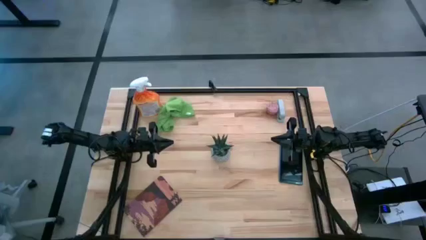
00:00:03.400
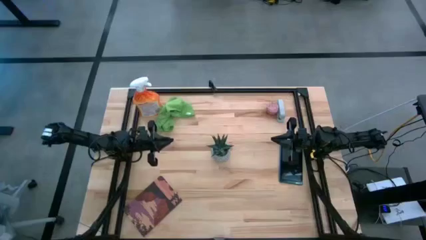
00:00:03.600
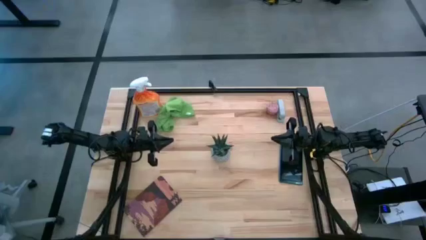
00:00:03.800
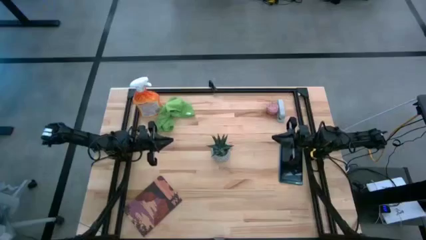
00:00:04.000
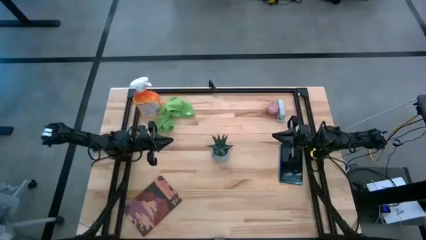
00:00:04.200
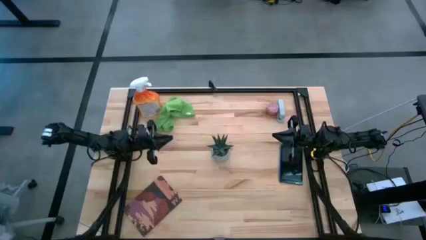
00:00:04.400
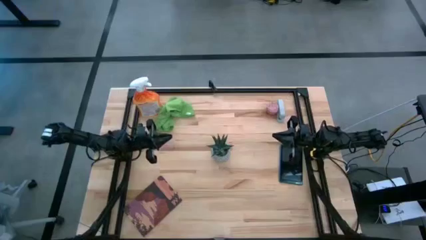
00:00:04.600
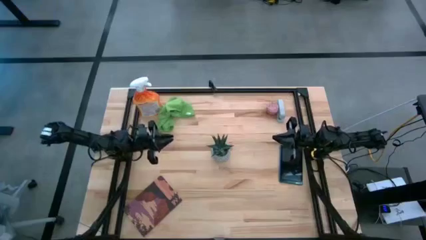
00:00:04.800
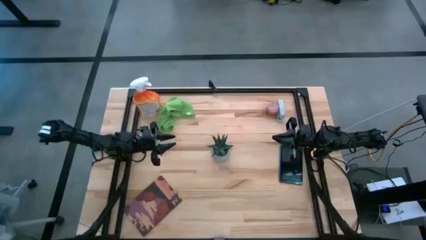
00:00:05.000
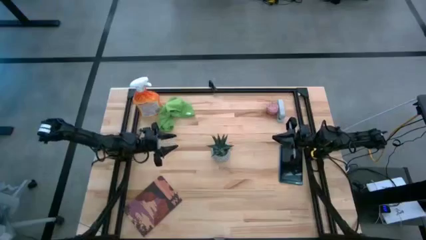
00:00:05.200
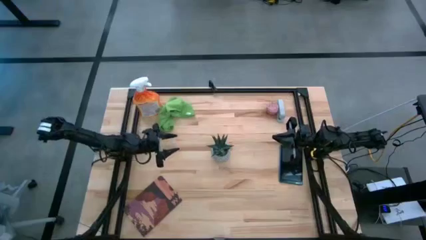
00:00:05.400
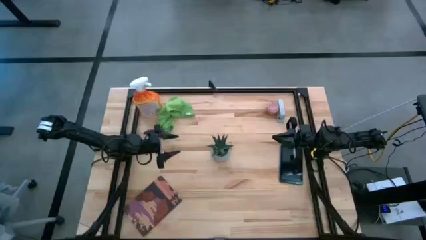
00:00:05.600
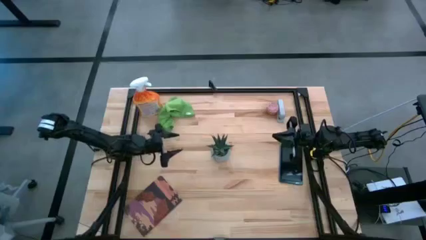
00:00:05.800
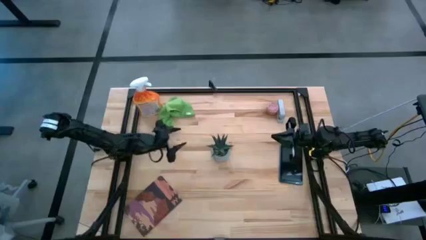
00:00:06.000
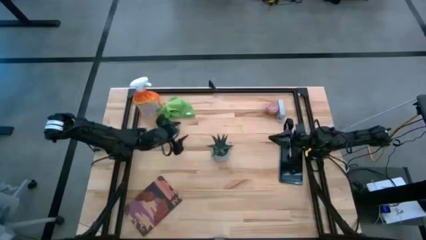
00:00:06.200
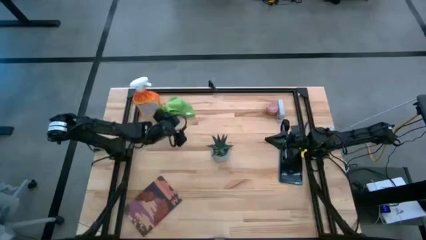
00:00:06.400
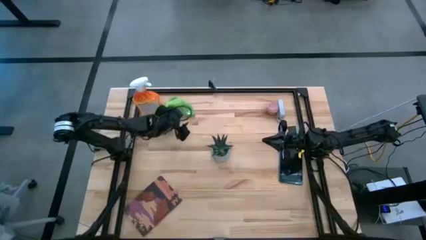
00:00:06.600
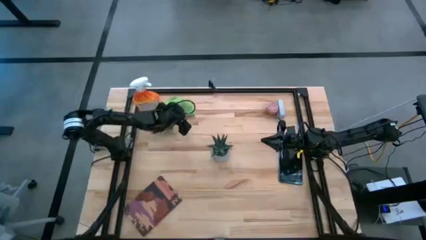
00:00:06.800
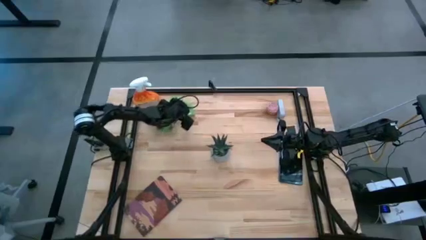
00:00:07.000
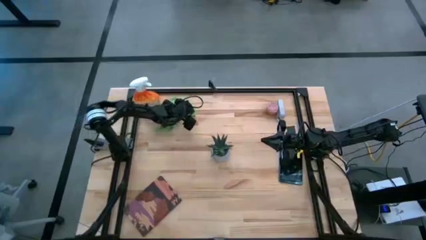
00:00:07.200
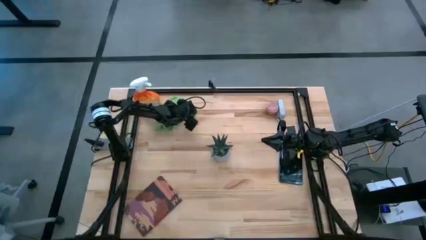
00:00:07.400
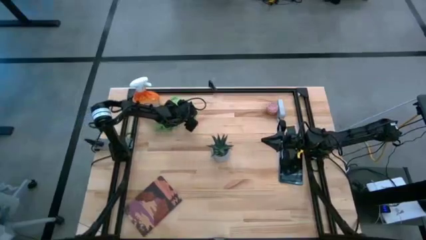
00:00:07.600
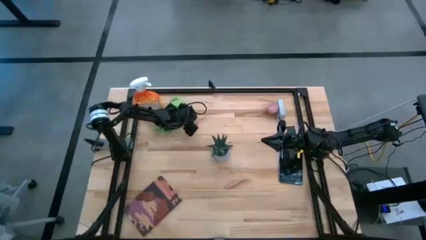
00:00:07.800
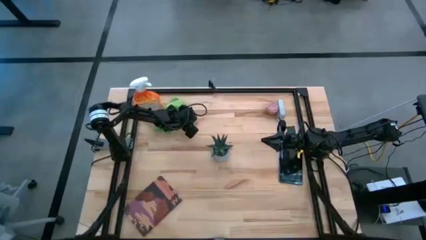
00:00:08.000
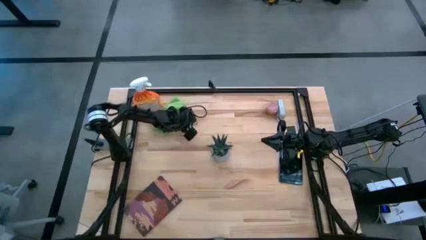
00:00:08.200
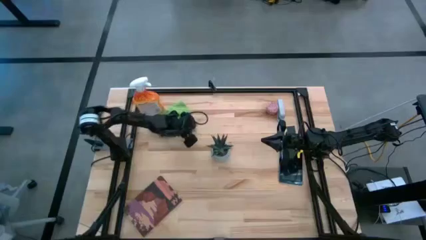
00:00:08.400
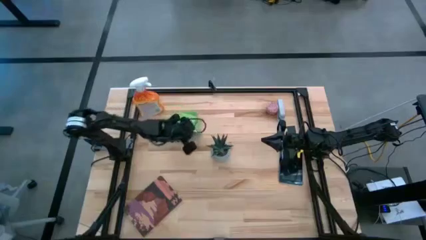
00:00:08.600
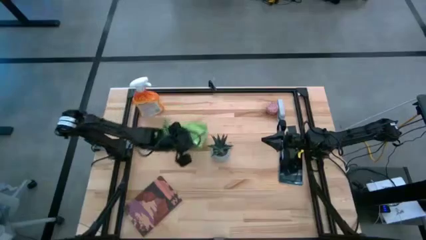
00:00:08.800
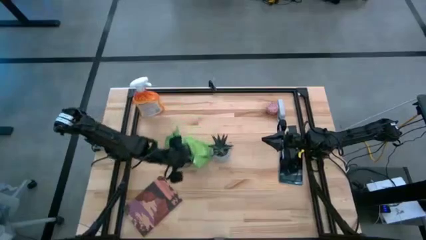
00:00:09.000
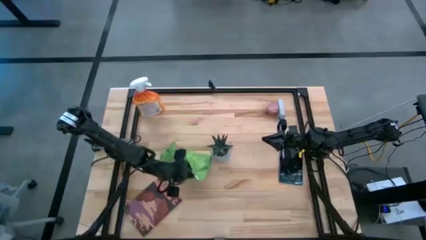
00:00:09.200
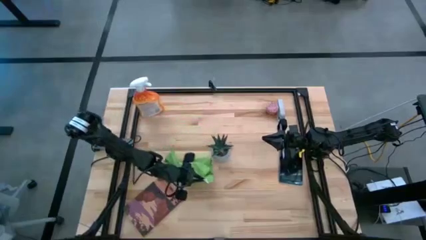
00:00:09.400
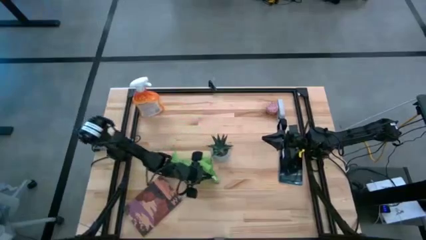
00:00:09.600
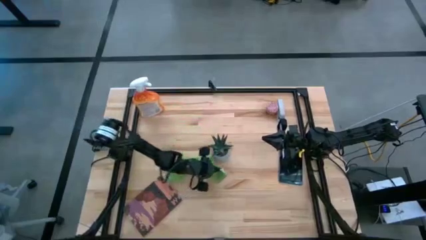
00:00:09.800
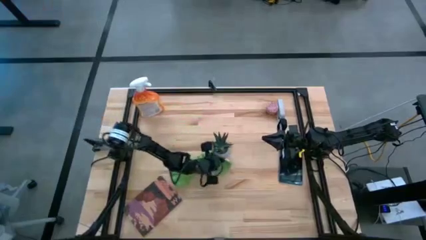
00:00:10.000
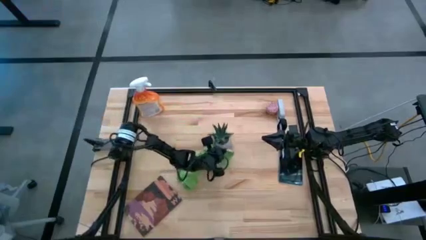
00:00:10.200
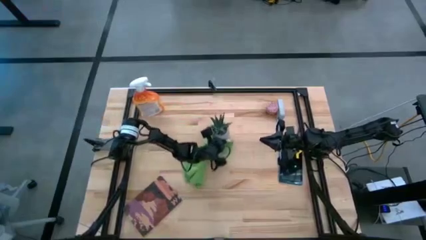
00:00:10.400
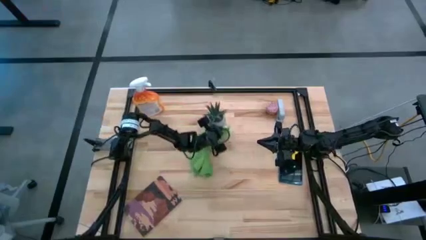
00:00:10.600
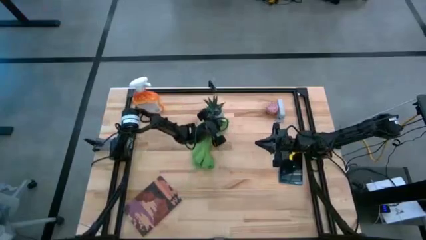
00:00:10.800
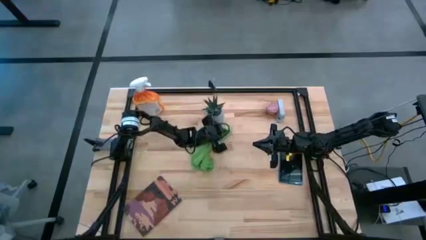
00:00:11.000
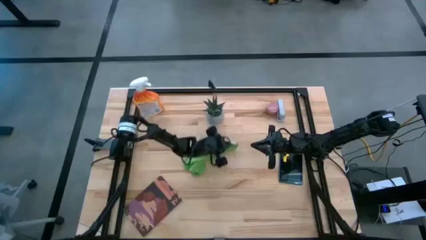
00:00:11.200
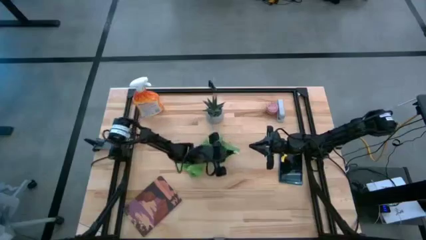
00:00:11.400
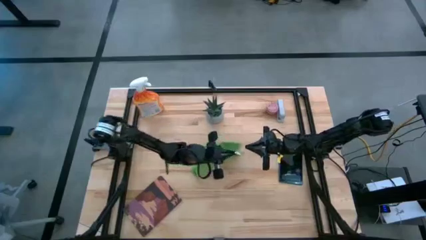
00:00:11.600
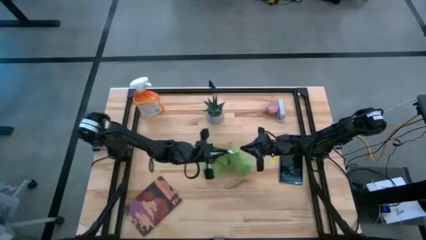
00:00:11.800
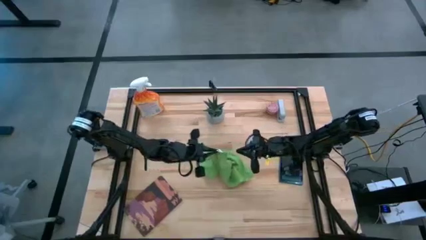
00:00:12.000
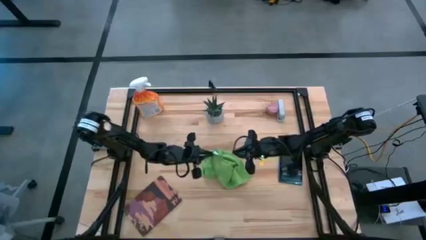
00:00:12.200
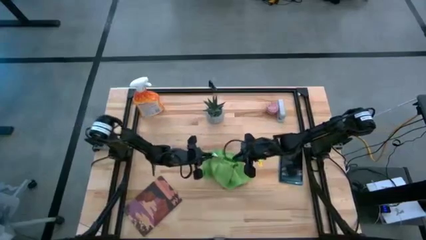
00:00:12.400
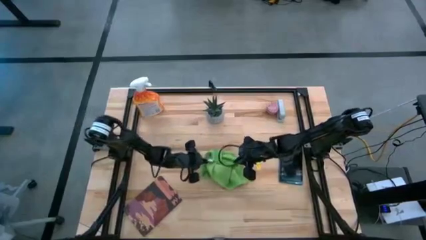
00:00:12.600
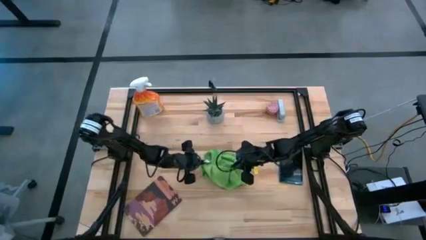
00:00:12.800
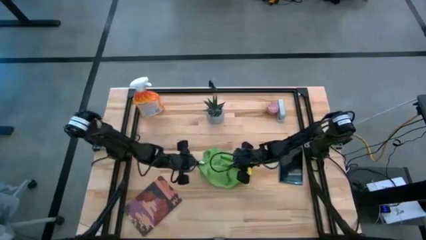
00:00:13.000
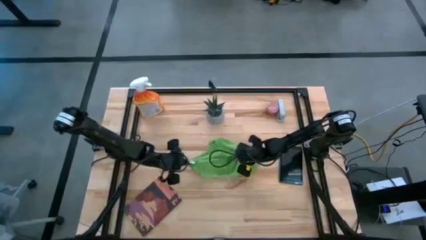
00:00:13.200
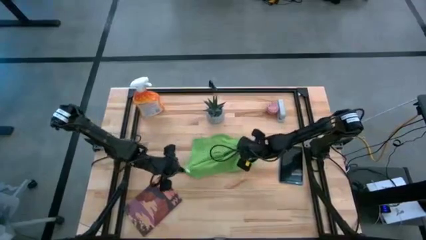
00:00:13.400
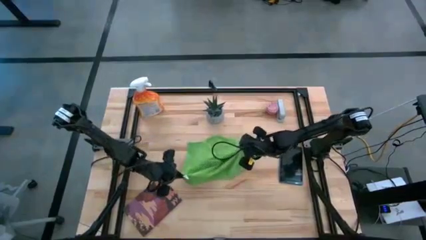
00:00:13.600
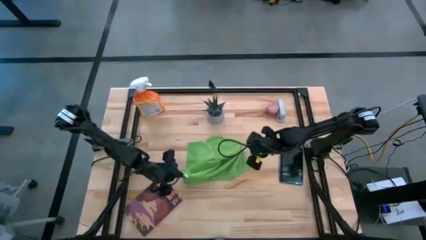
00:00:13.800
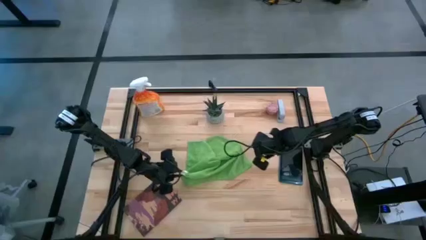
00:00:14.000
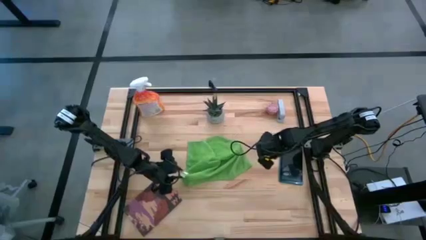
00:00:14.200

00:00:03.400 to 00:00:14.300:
Task: Apply microfiber cloth
Move the green microfiber cloth to the center
